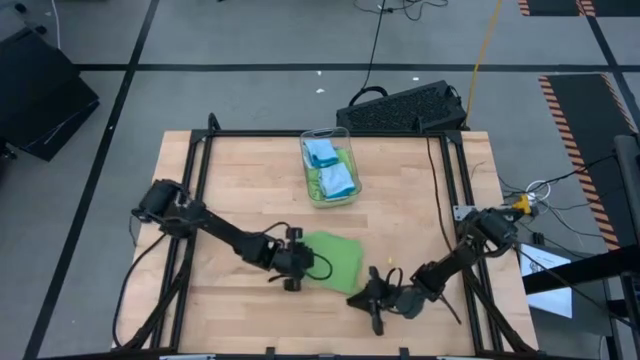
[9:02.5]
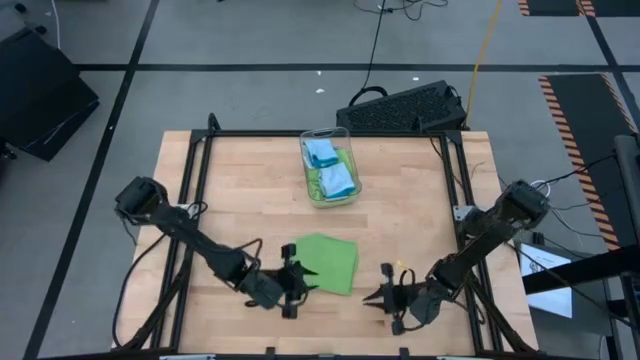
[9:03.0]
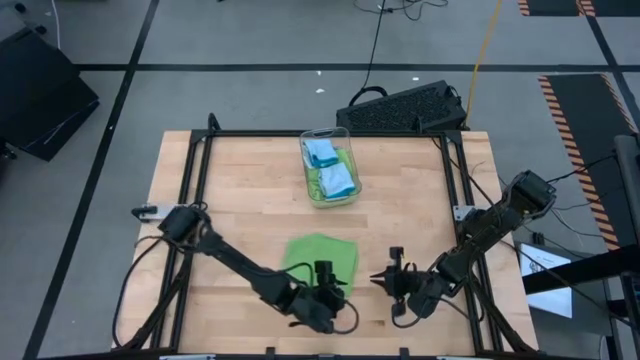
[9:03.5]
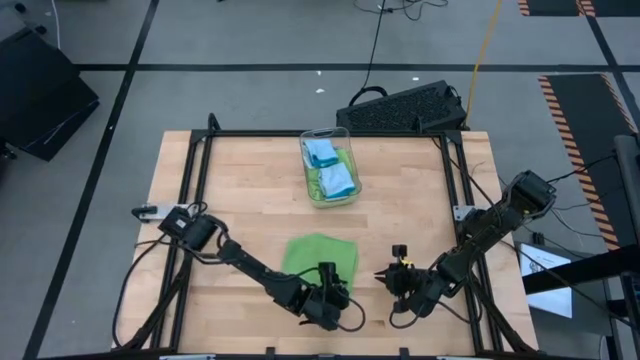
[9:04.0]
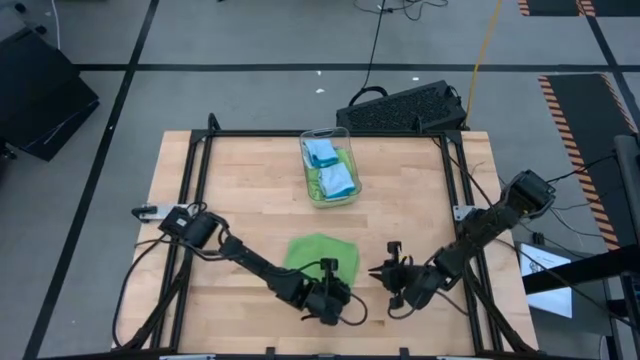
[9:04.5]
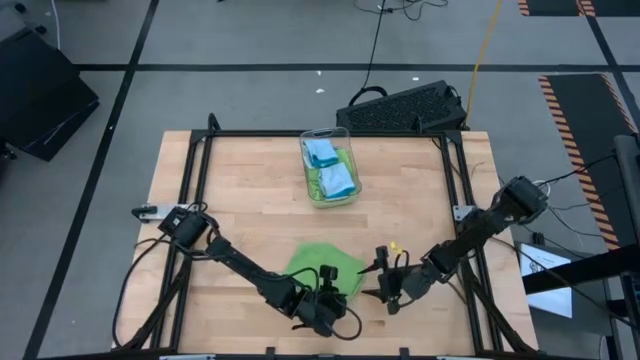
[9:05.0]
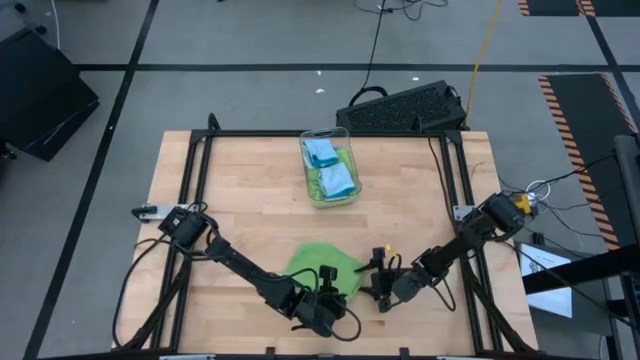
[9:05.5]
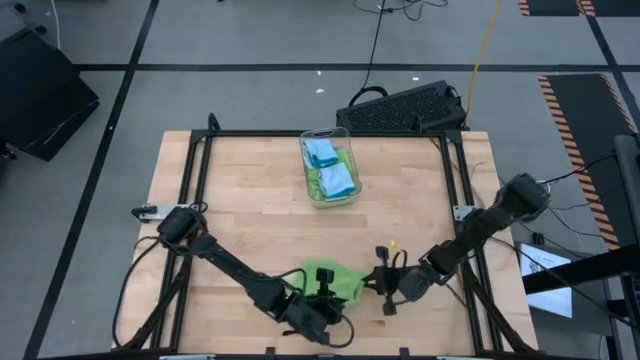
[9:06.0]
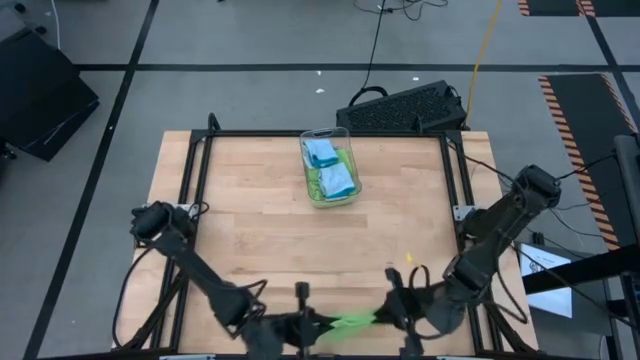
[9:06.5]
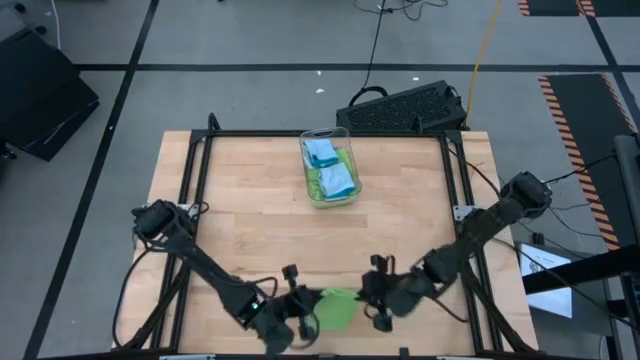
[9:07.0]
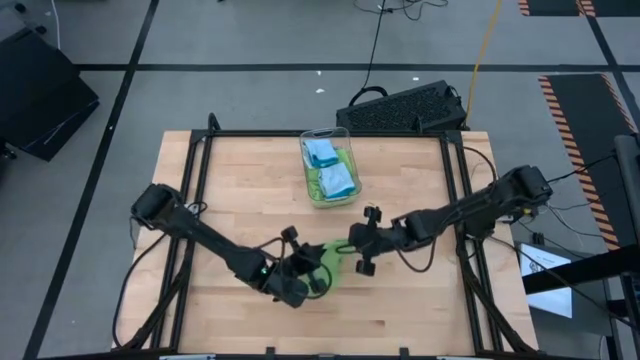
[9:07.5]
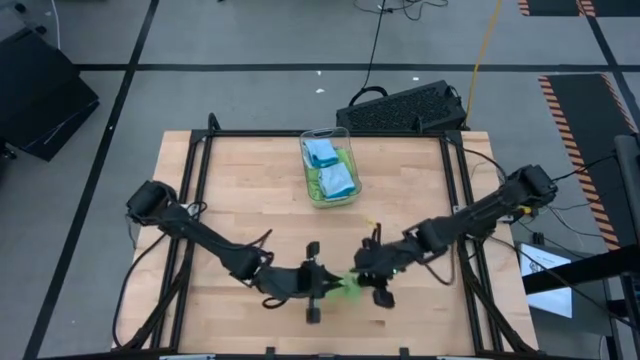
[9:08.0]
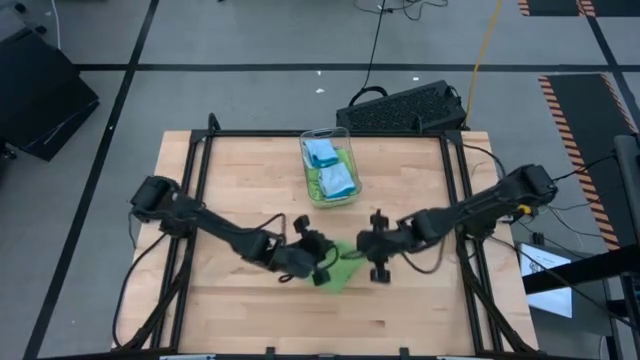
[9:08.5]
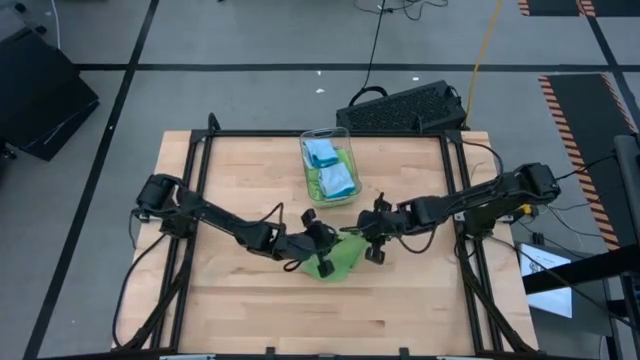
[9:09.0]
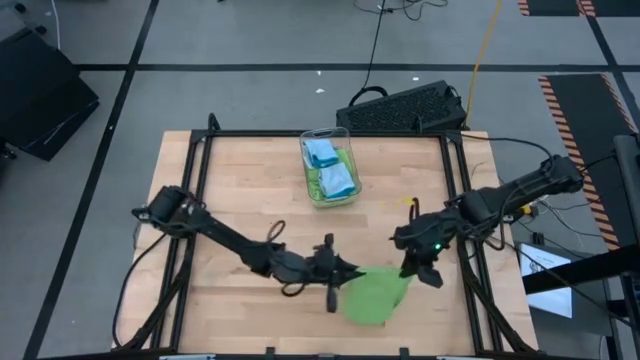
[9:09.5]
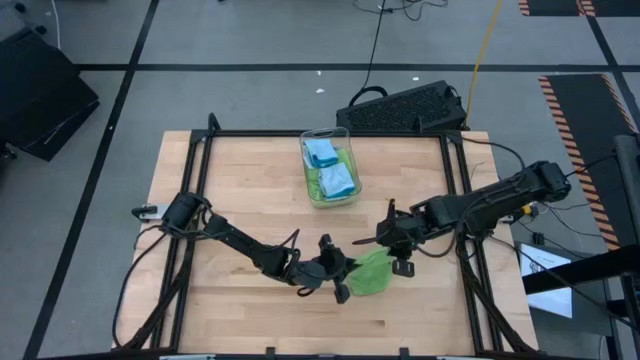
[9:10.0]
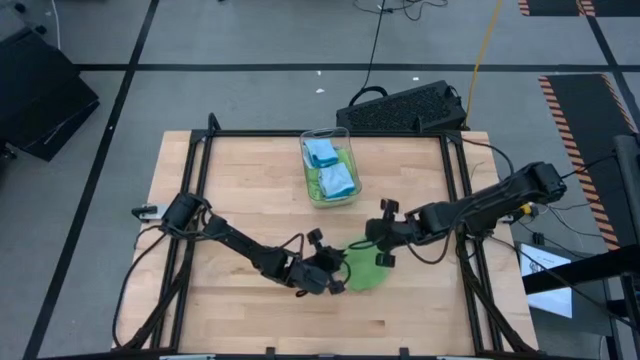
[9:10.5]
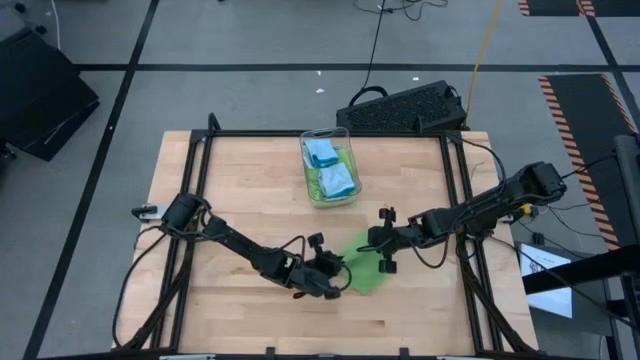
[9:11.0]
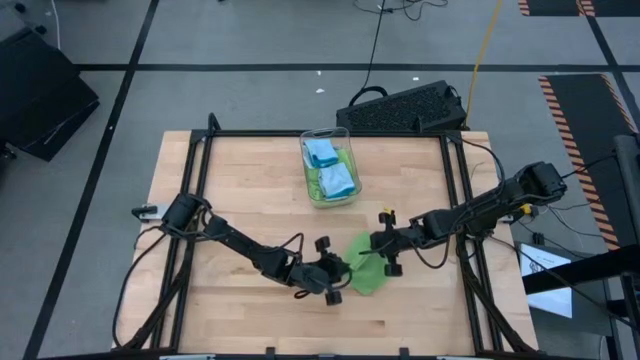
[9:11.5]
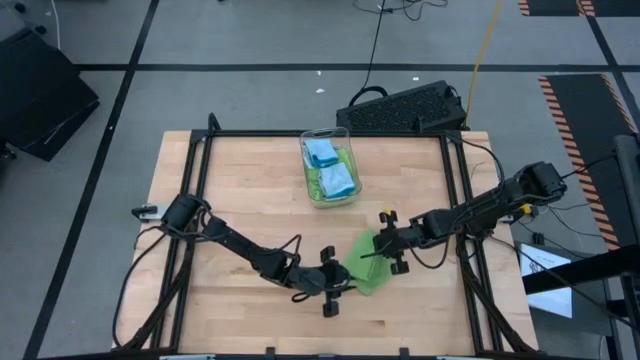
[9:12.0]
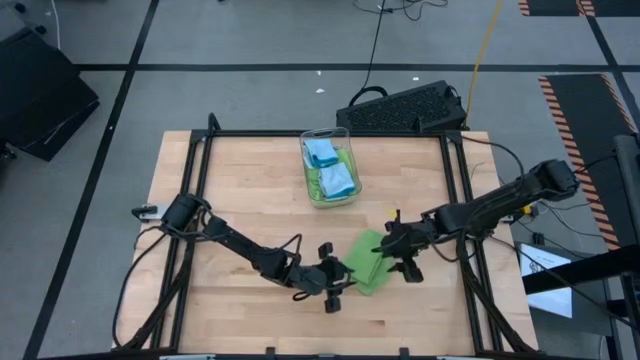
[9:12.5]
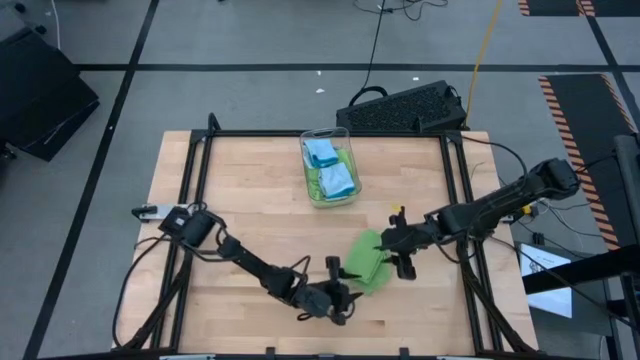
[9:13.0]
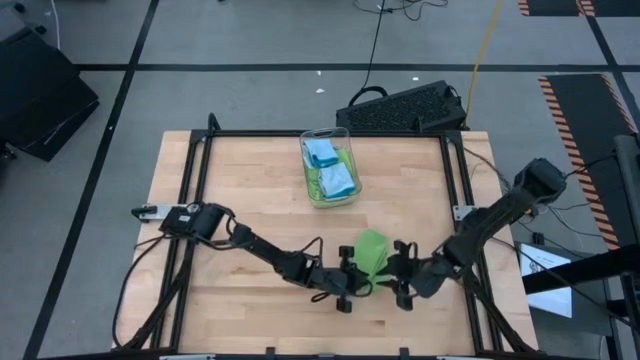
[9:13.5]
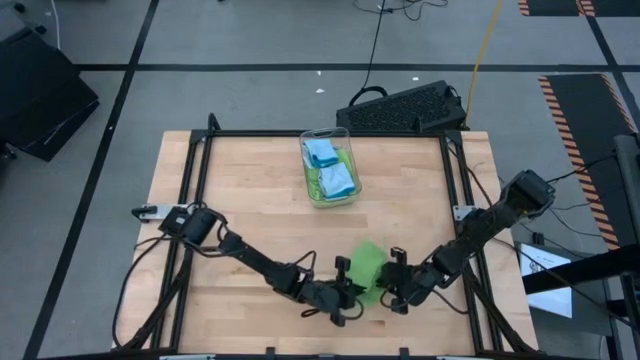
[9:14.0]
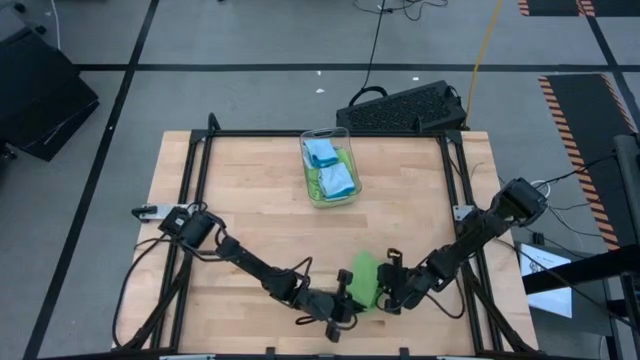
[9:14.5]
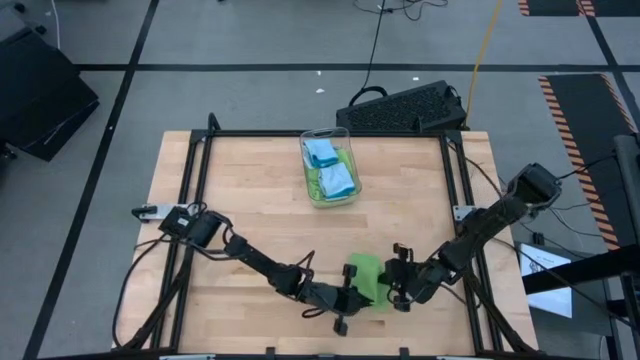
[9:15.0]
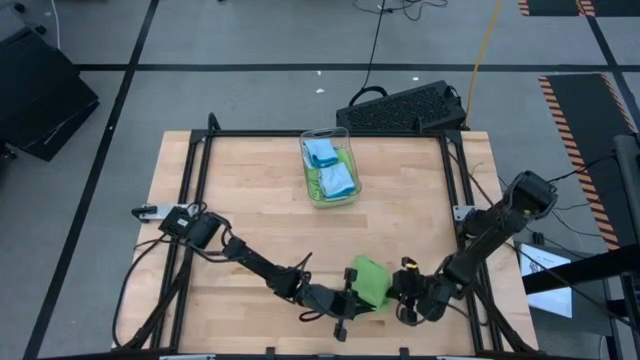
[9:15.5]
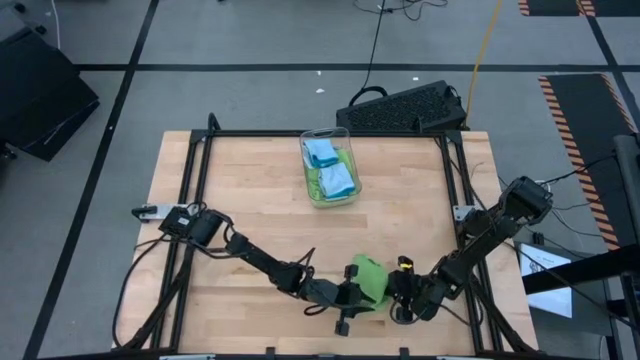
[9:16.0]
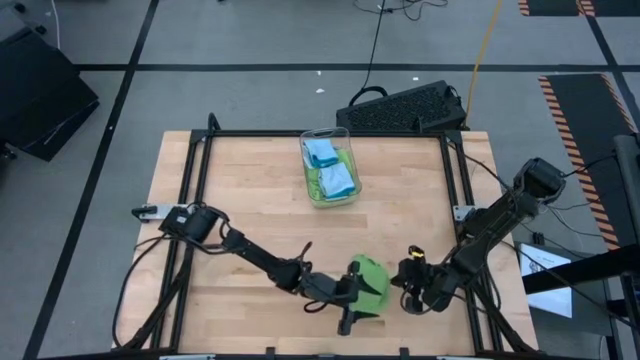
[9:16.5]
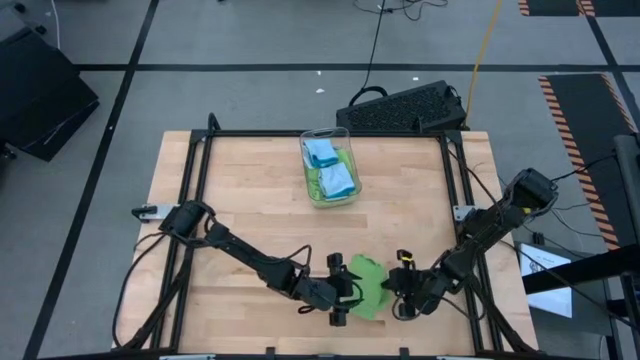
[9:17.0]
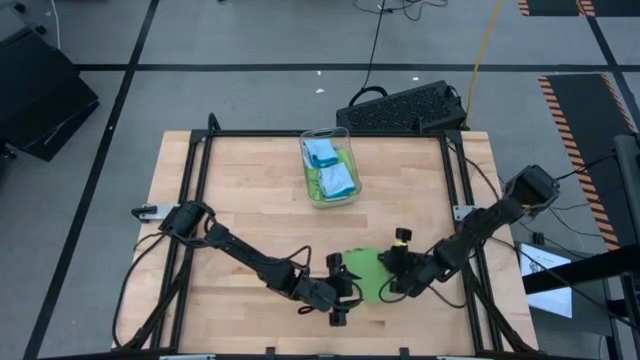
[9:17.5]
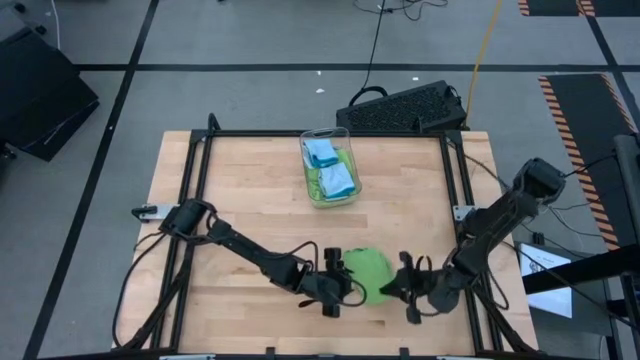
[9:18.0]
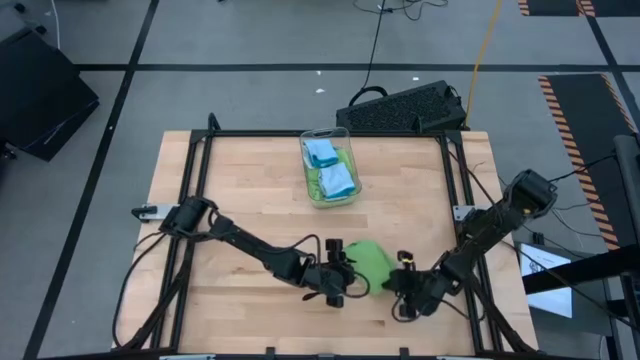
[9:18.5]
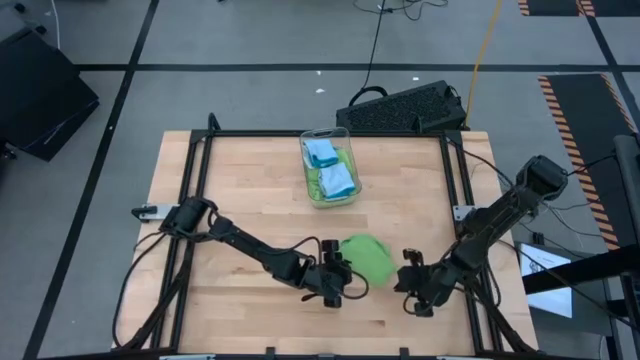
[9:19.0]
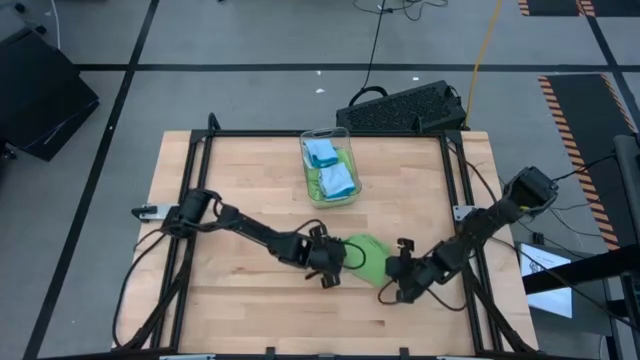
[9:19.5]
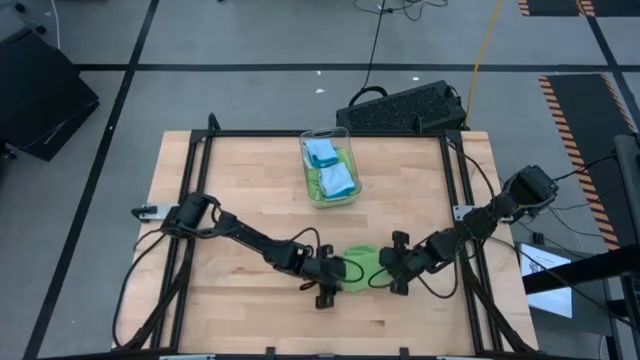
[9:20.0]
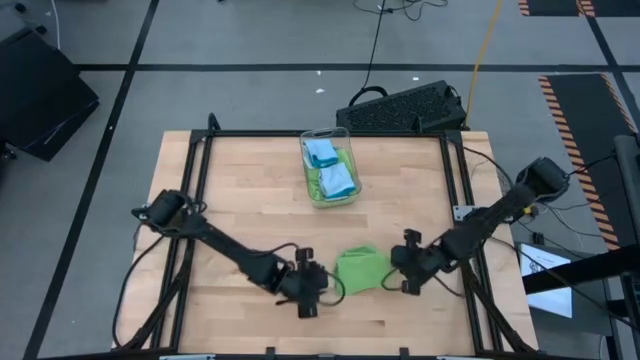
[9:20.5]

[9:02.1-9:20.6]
Task: Fold microfiber towels
Fold the green towel
